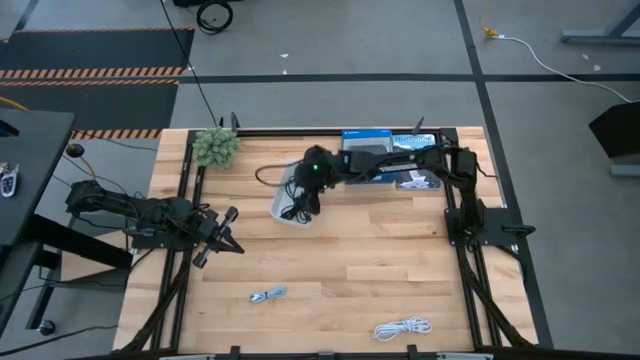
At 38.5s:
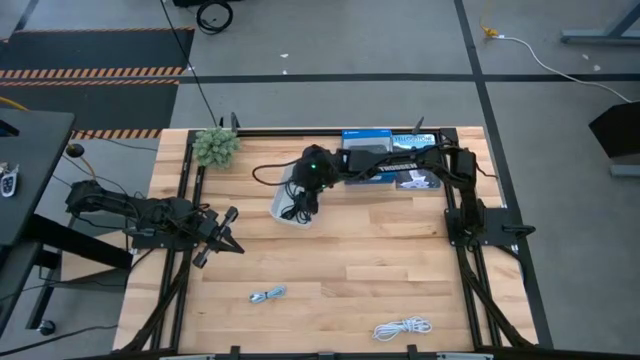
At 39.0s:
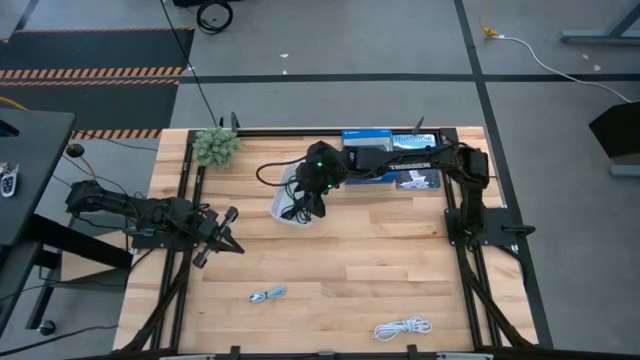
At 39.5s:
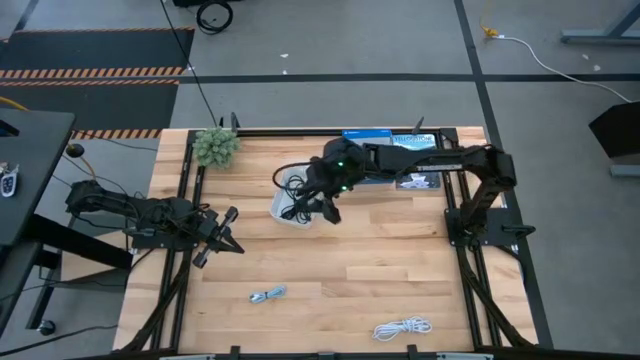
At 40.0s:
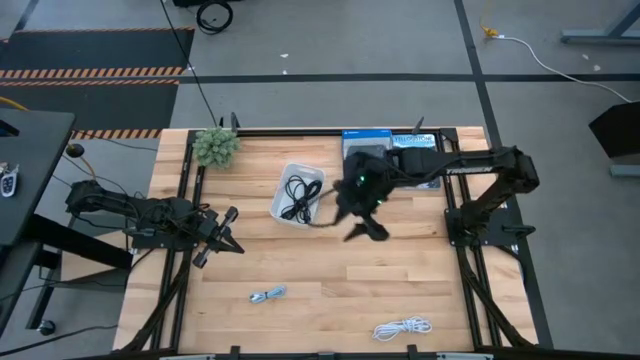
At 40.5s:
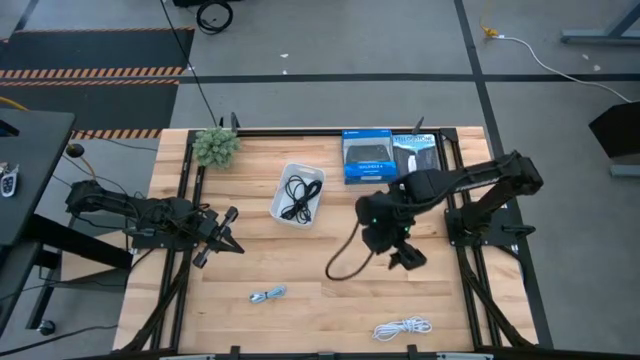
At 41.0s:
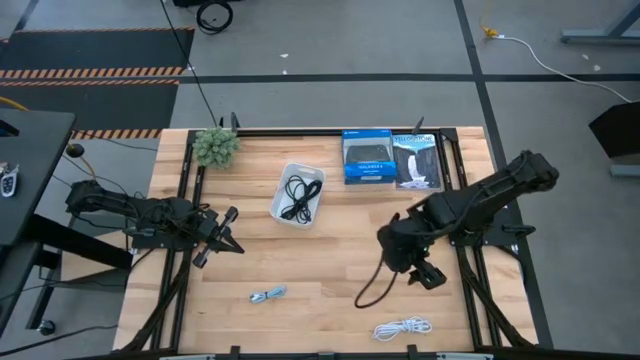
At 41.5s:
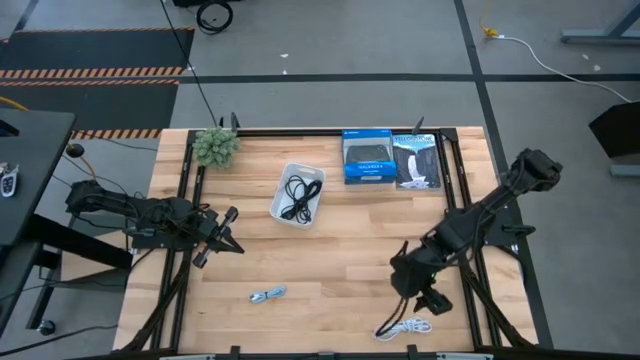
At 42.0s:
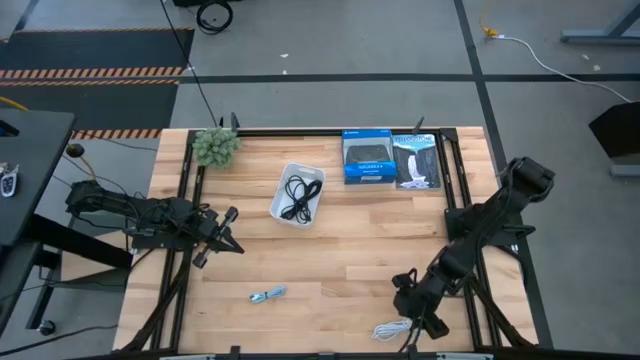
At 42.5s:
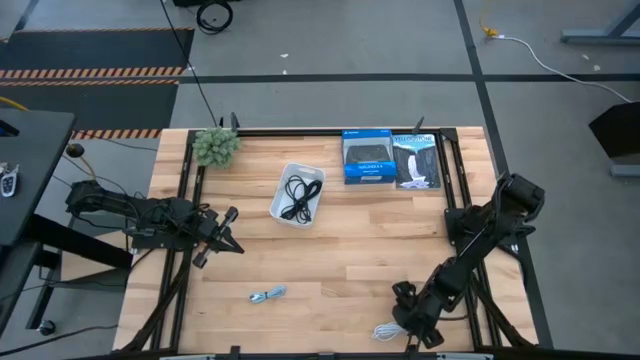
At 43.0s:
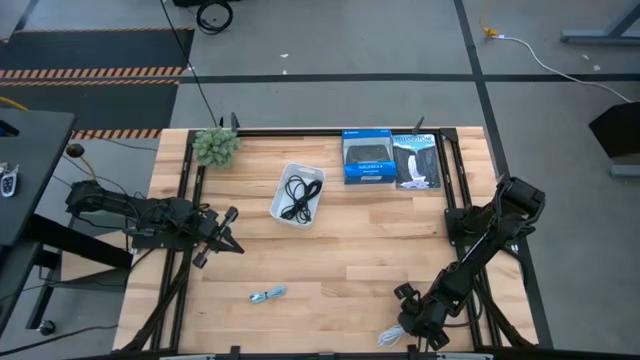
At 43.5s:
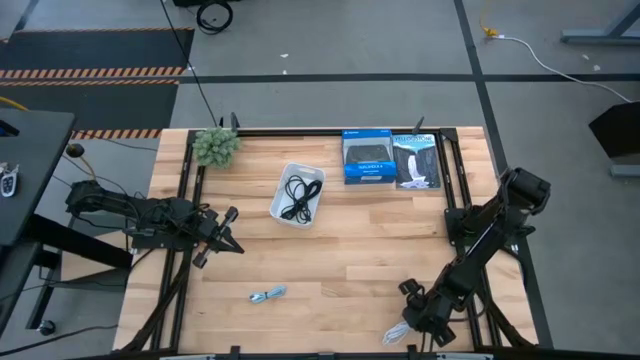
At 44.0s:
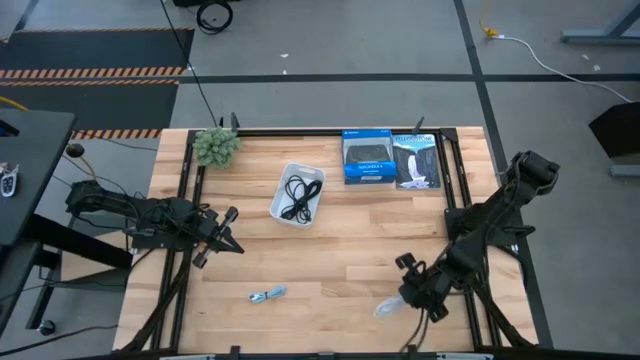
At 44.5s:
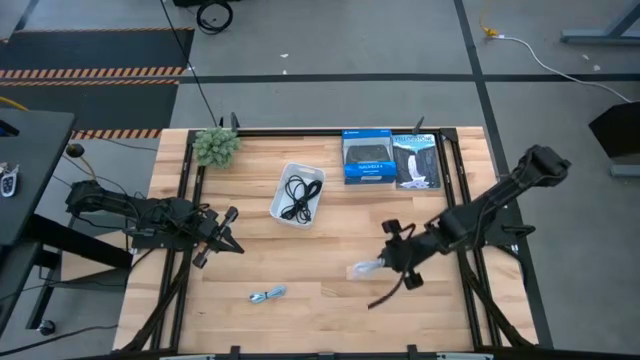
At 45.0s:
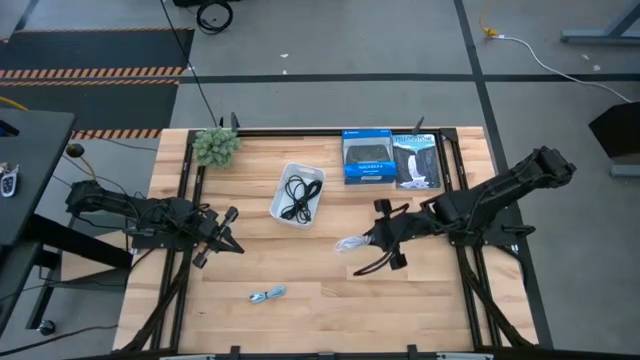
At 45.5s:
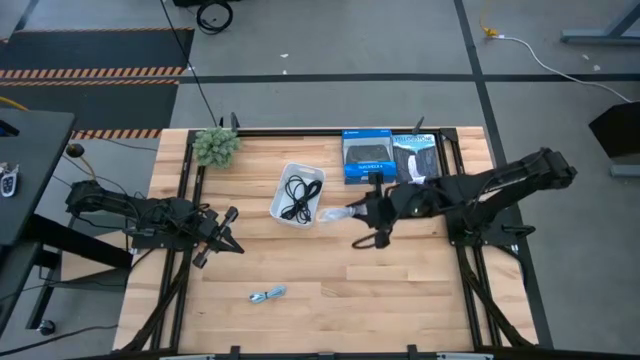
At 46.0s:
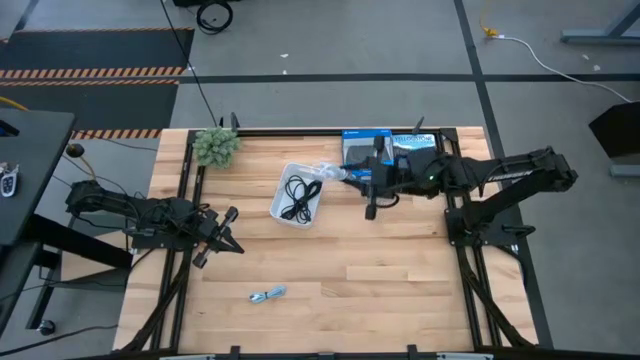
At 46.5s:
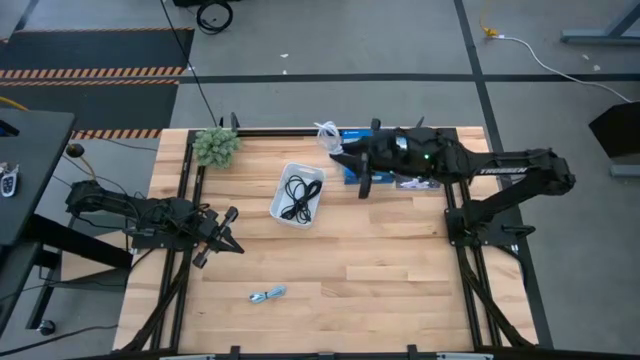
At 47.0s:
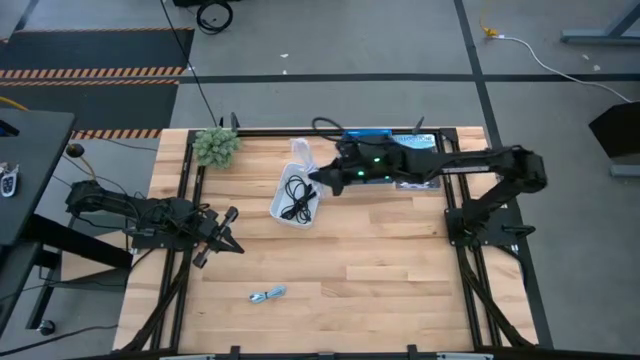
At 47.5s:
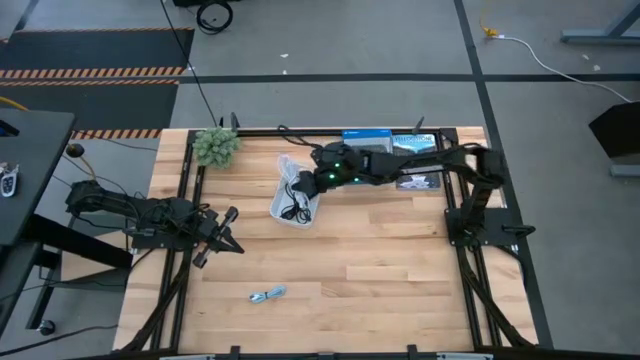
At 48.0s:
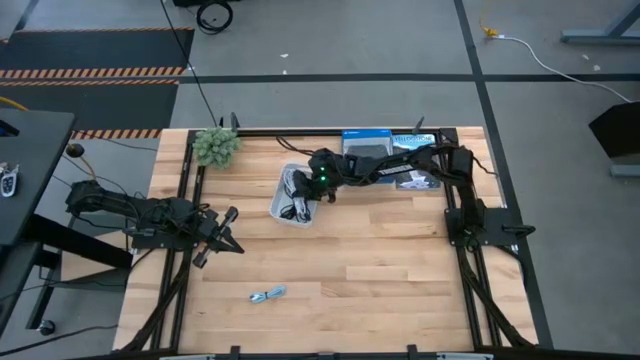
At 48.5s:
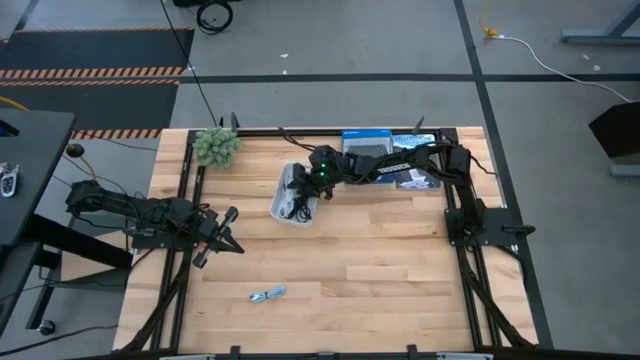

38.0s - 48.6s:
Task: Pick and place USB-C Cables
Put the white charger cable into the white bin

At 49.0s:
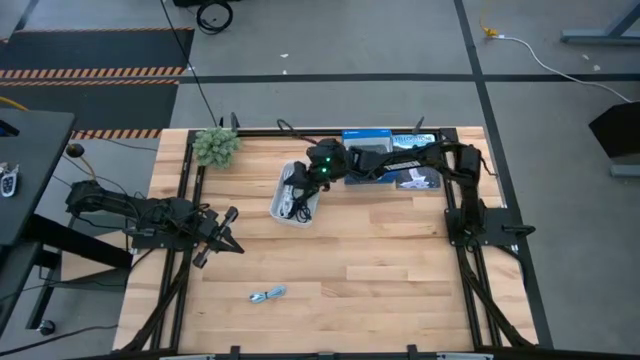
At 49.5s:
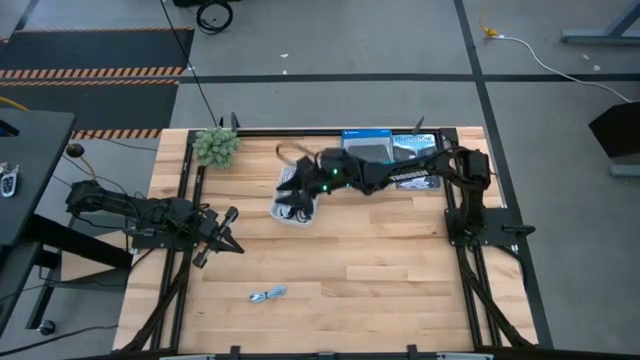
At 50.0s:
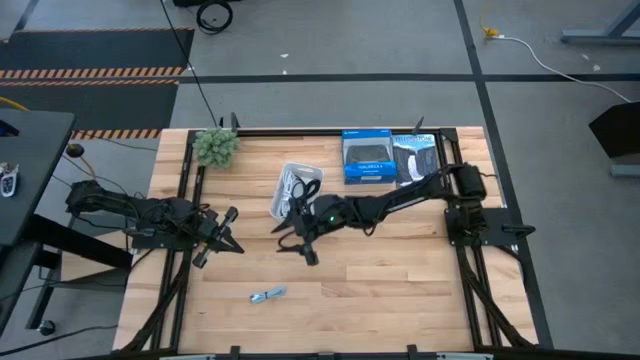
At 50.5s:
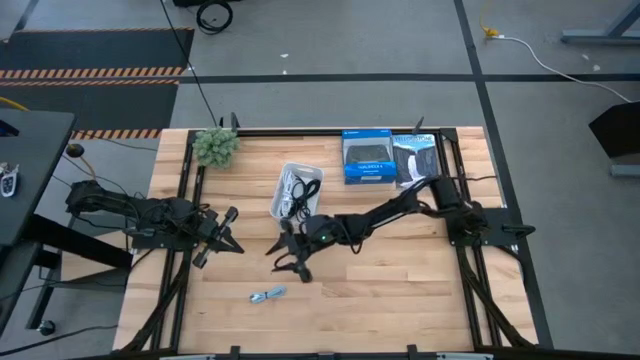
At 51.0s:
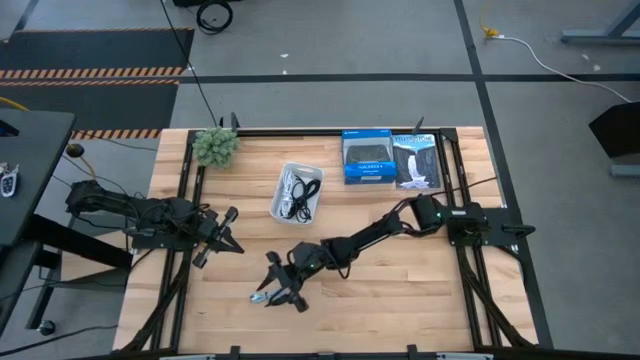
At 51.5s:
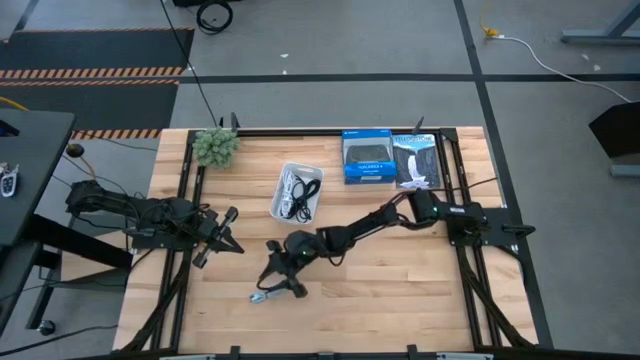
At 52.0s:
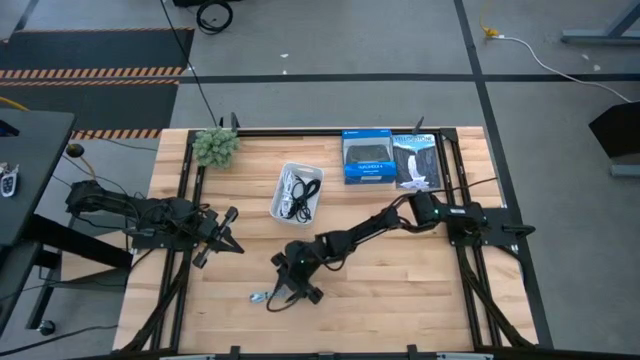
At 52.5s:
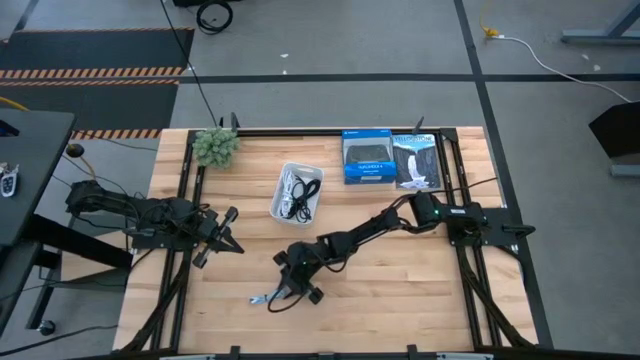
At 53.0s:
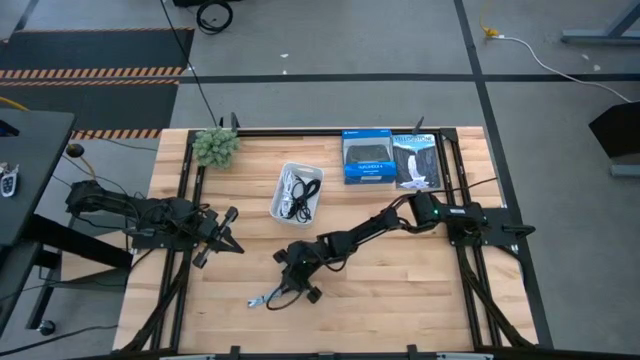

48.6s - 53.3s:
Put the blue charger cable into the white bin

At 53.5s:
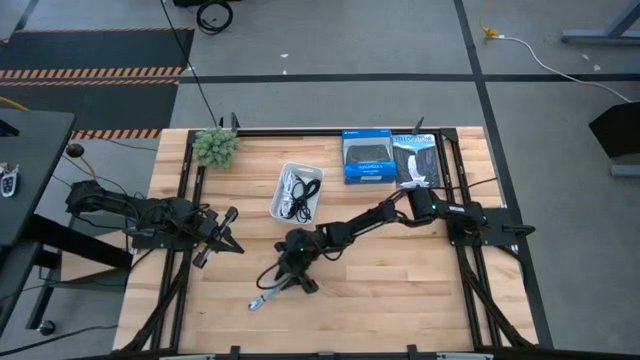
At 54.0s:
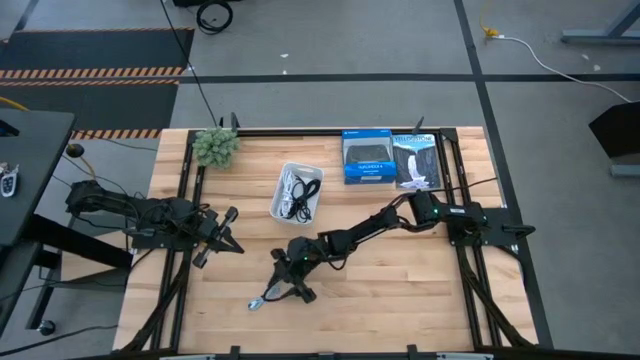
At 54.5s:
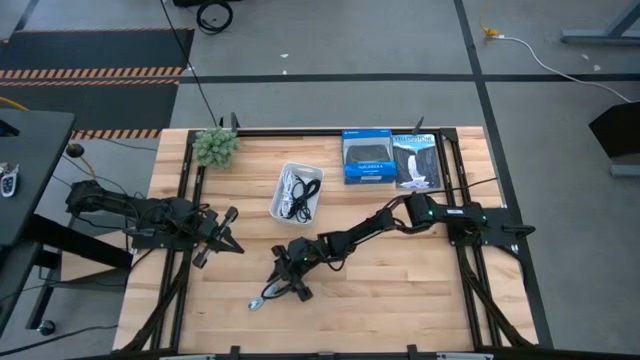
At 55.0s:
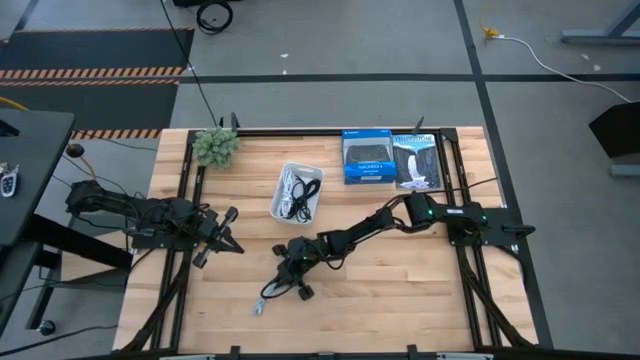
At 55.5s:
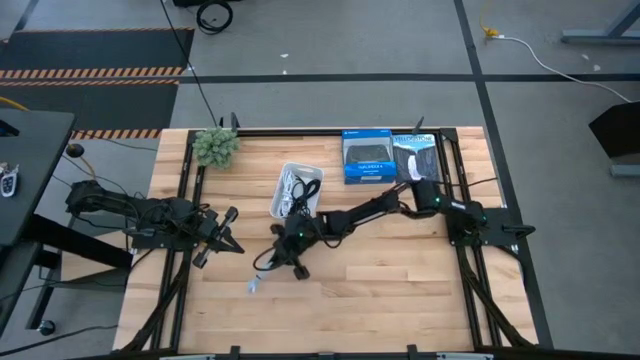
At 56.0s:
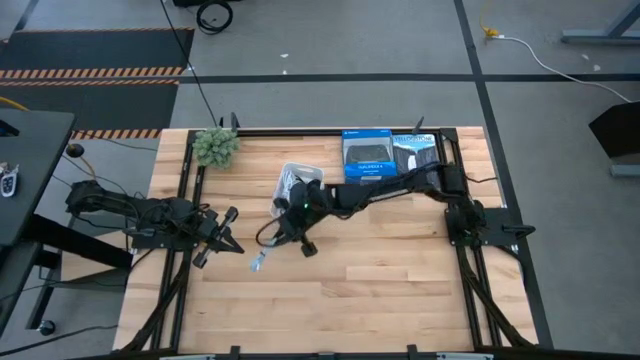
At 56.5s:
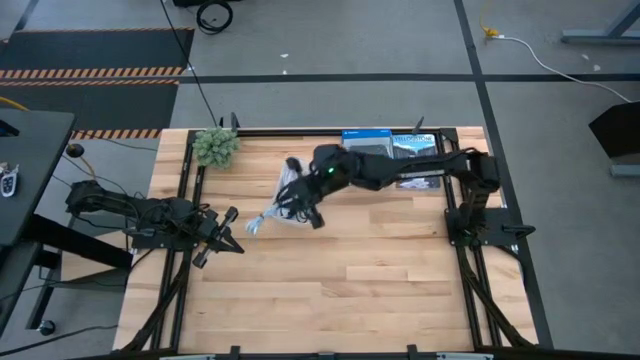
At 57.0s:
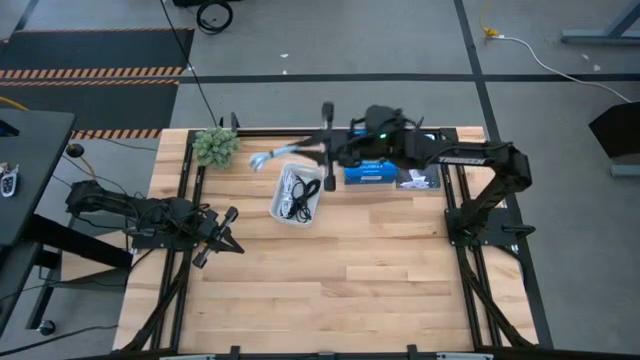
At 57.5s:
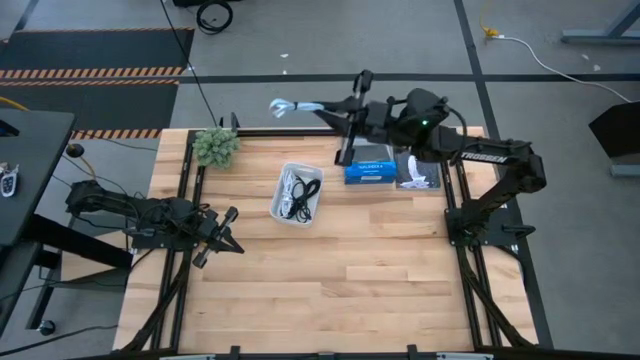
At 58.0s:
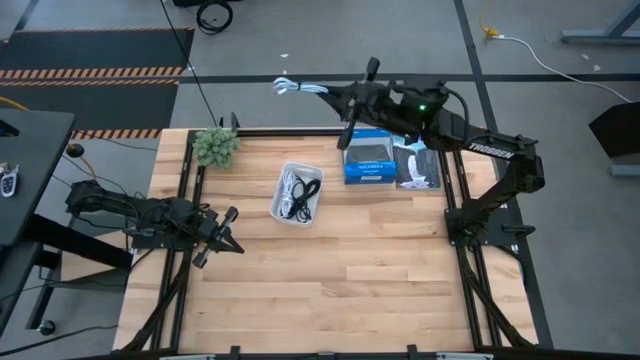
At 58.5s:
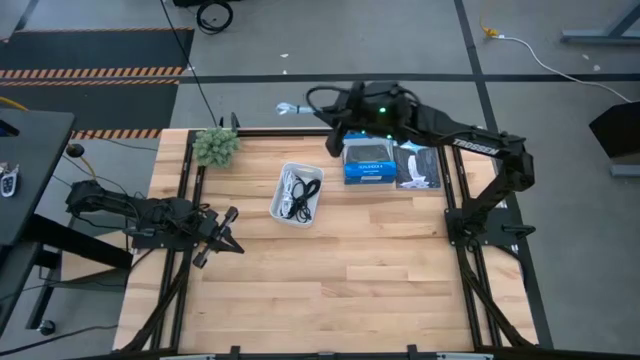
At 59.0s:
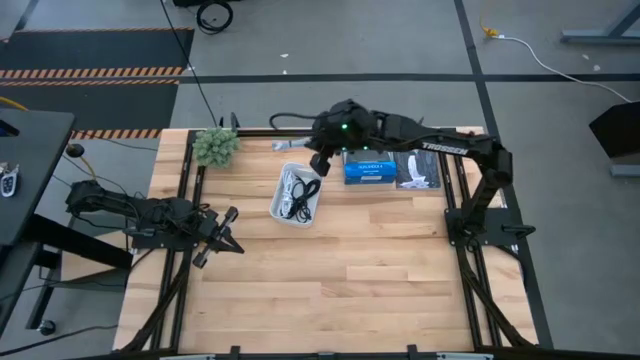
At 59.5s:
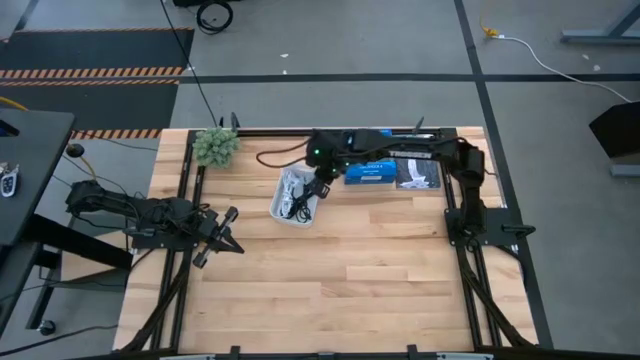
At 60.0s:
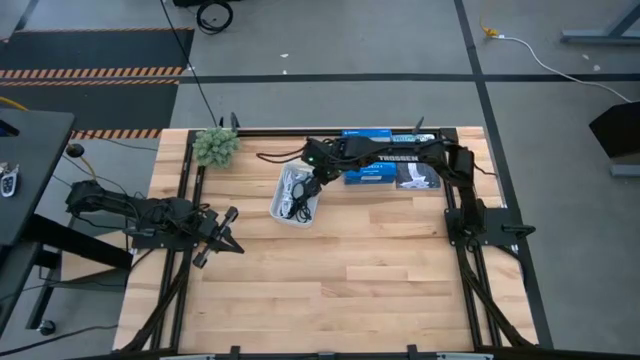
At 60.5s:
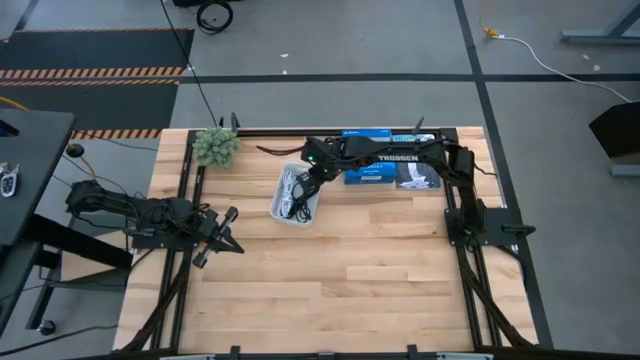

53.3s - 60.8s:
Put the blue charger cable into the white bin
